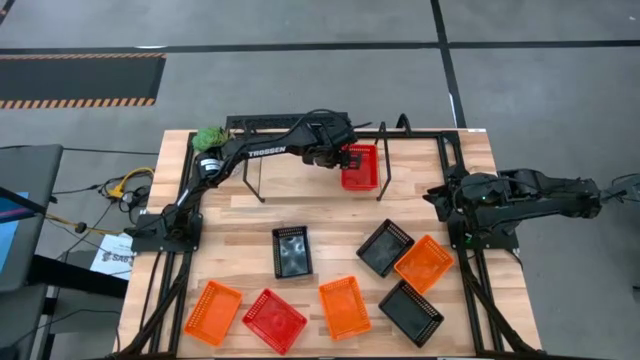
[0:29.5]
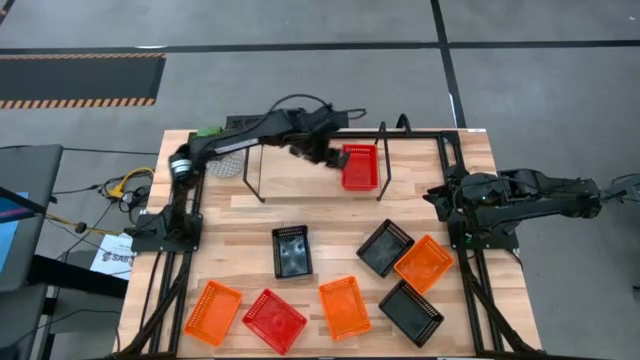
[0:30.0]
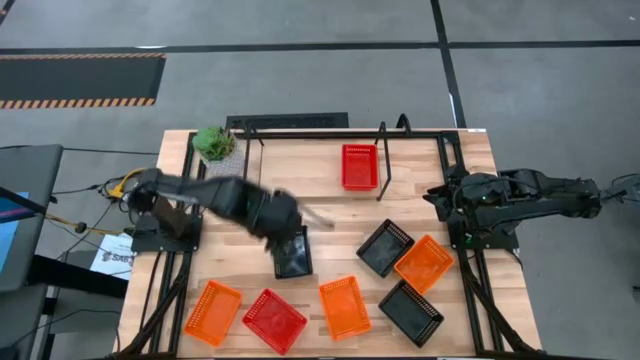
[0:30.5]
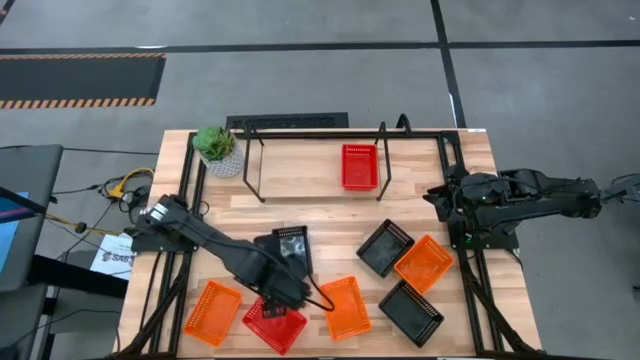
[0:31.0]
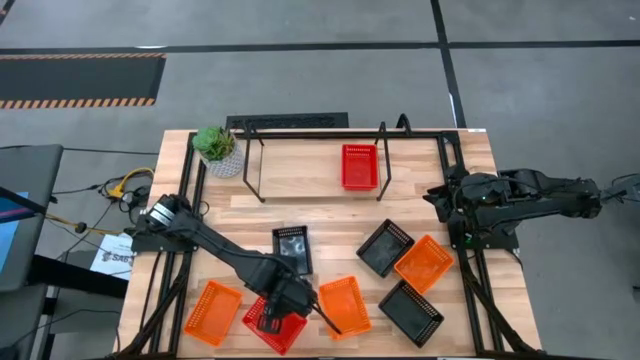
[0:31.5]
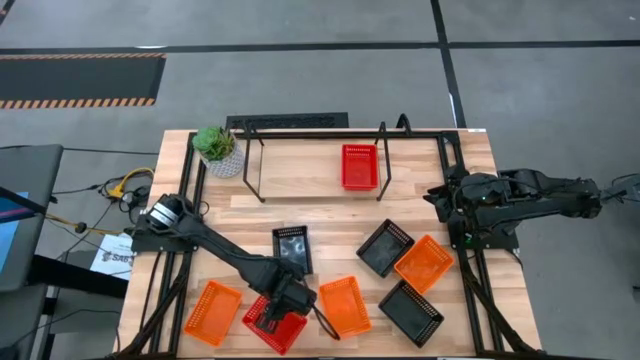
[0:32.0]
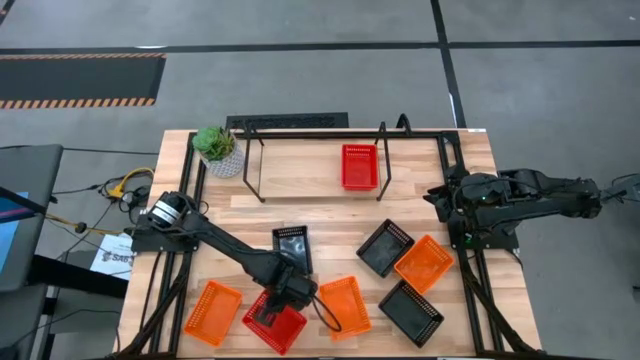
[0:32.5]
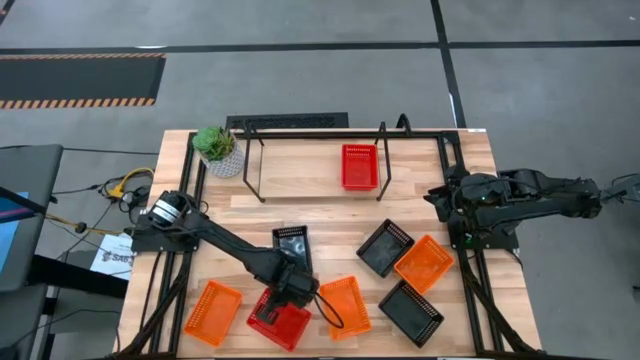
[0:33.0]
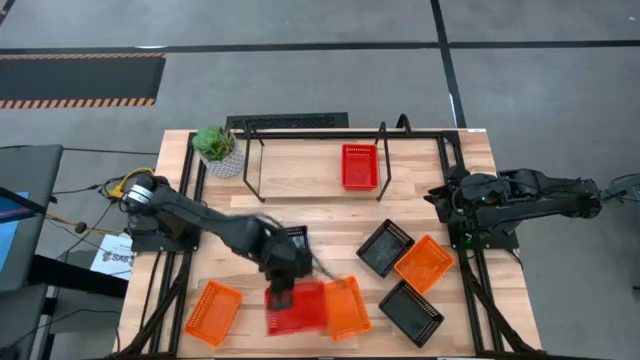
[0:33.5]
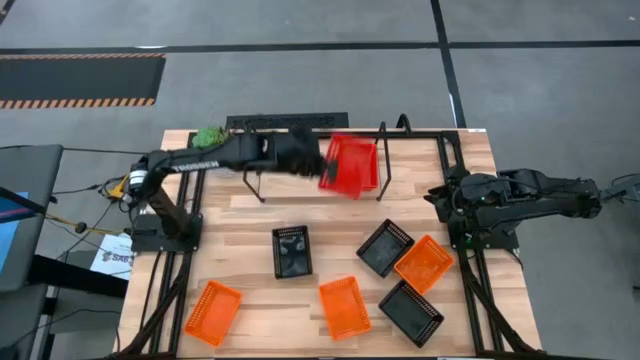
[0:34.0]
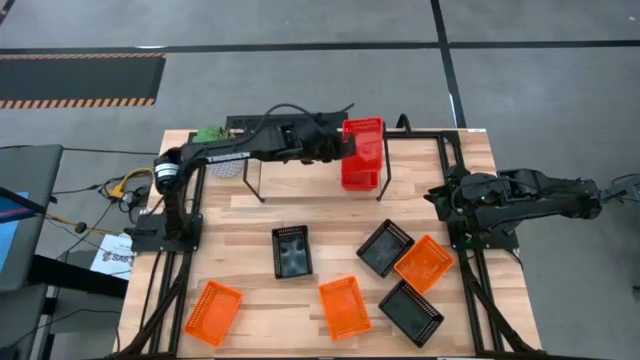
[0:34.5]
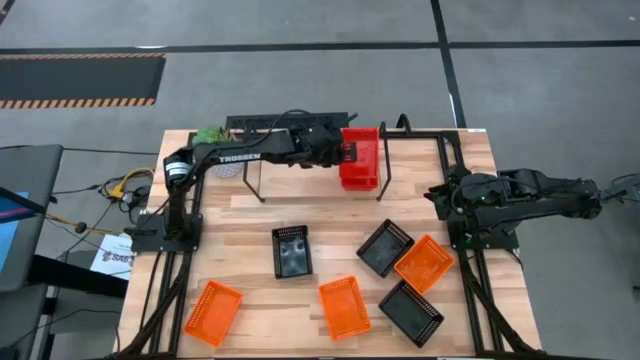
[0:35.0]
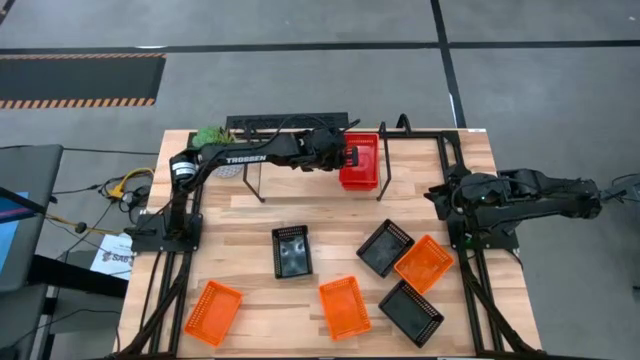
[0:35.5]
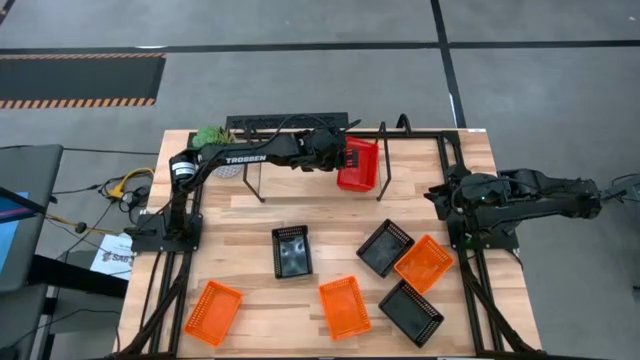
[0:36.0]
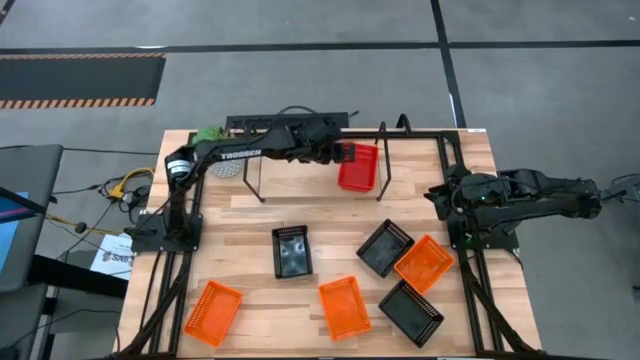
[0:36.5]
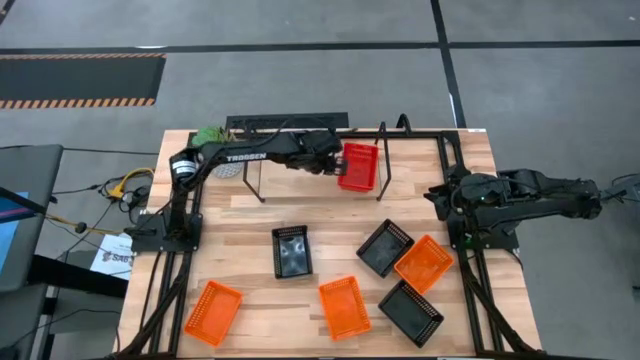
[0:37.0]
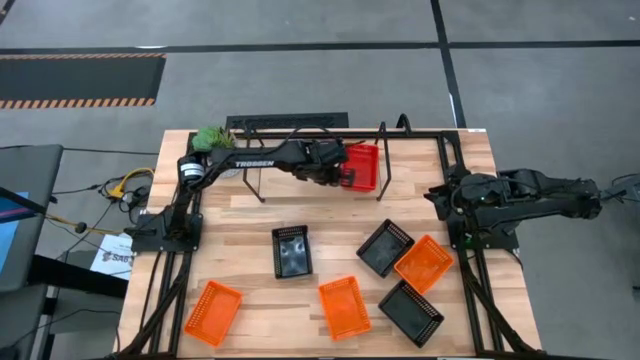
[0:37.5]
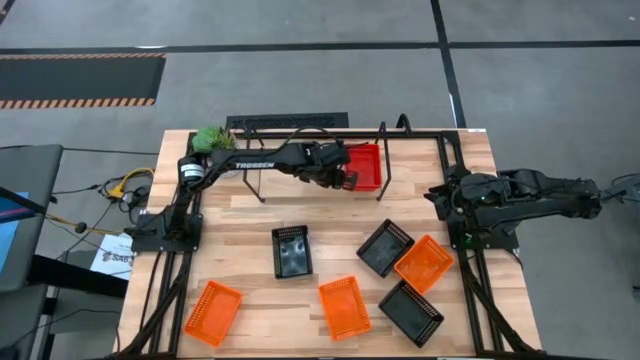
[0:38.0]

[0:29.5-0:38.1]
Task: Stack baskets on shelf by color
Stack the red bin on top of the red bins on the shelf

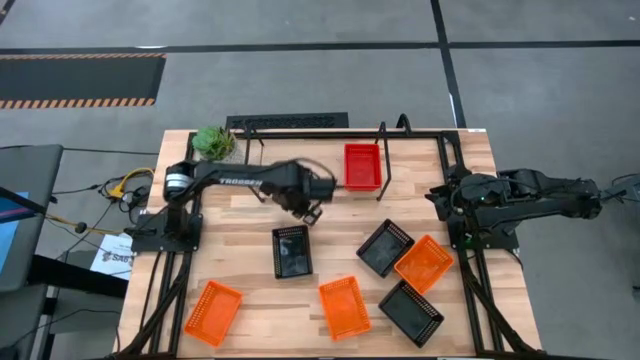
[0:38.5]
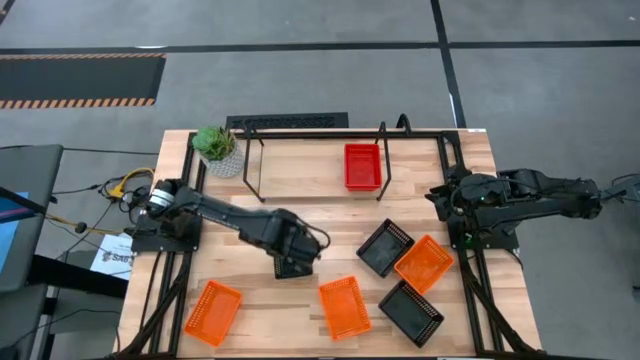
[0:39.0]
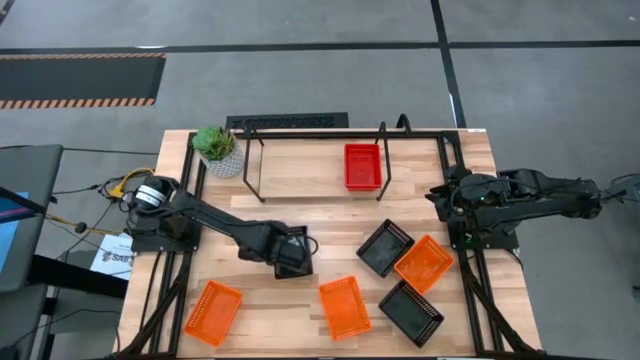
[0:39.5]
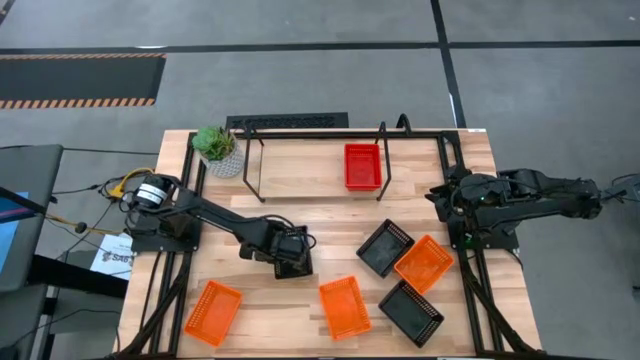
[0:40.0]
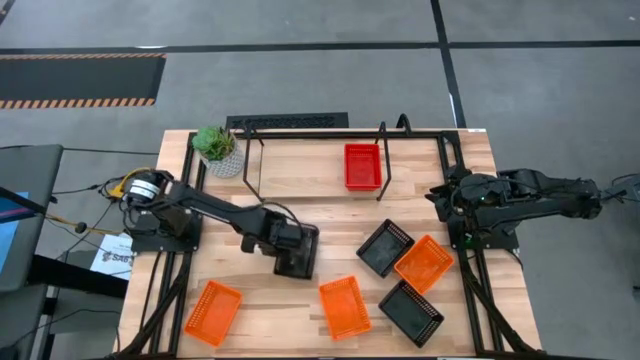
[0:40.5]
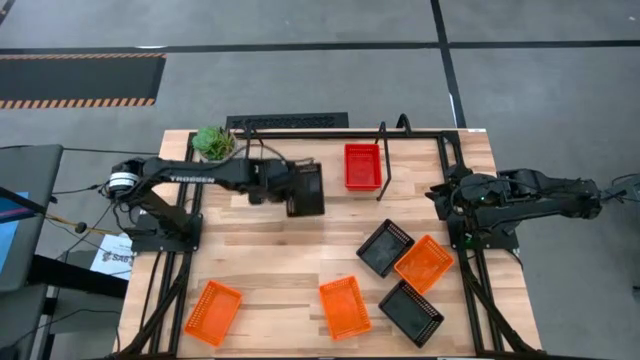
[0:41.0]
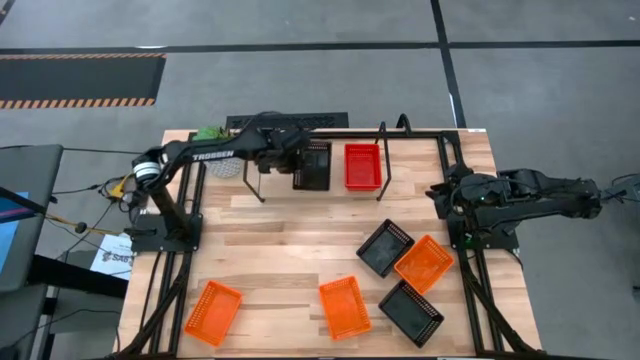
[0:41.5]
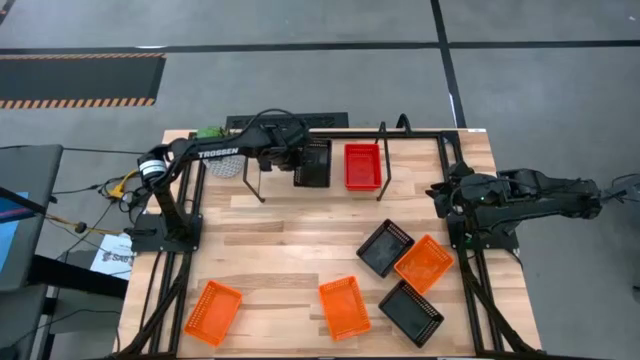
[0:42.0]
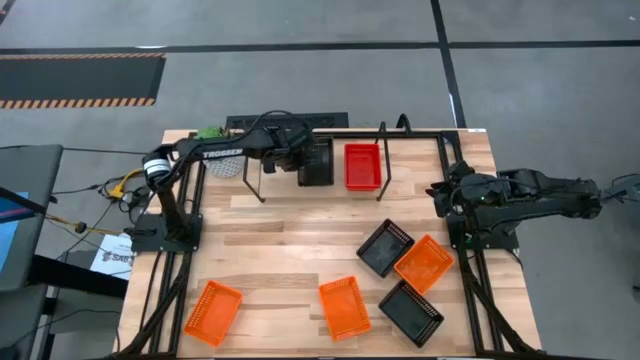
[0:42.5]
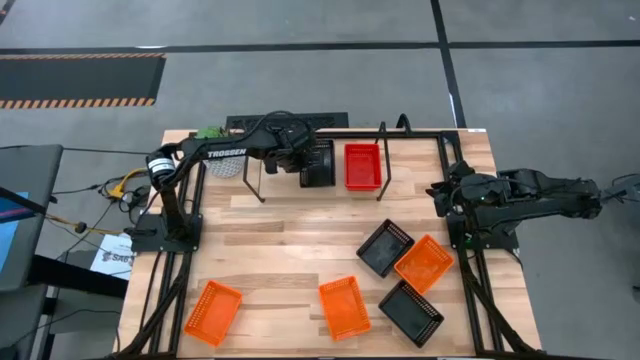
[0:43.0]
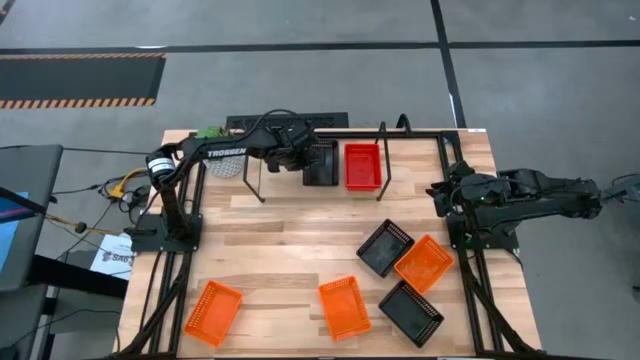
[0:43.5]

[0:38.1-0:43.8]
Put the top left black bin on the shelf

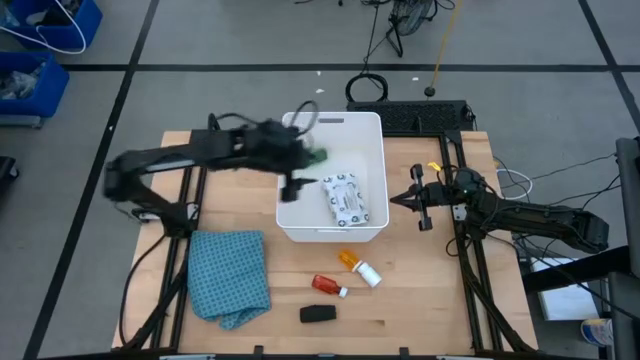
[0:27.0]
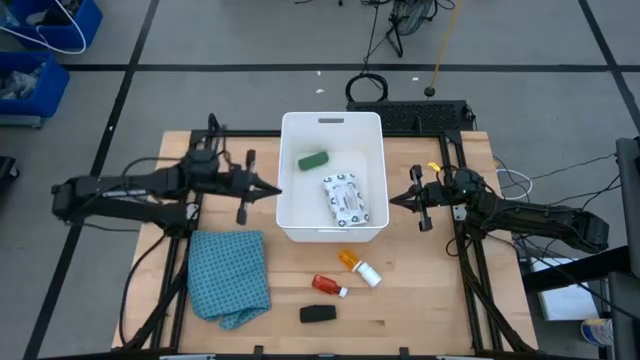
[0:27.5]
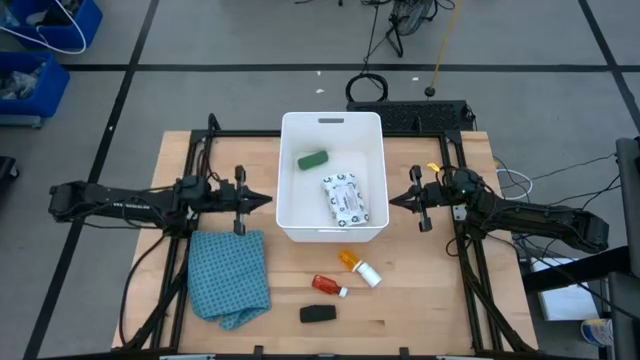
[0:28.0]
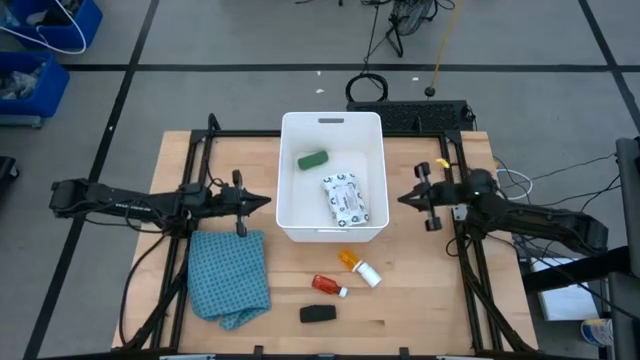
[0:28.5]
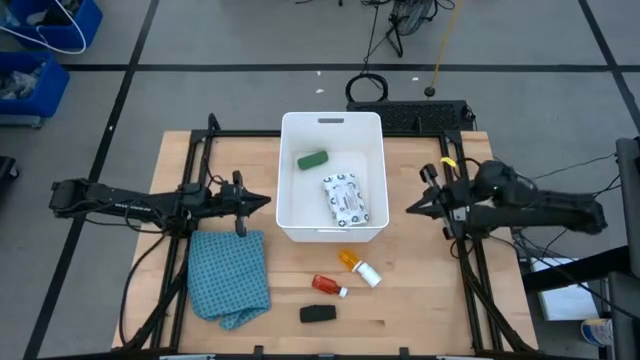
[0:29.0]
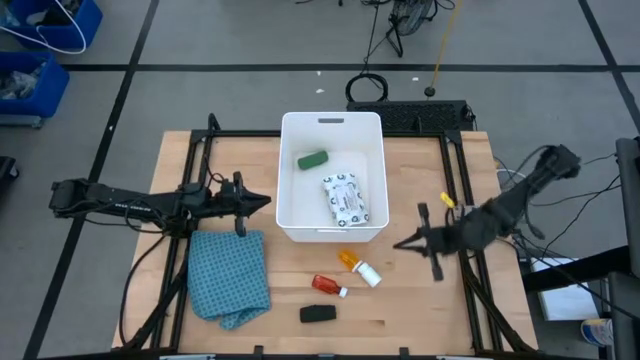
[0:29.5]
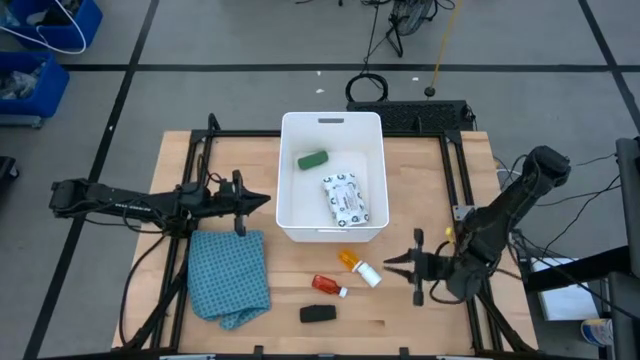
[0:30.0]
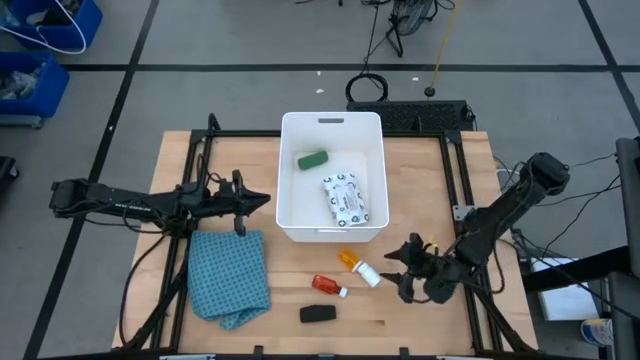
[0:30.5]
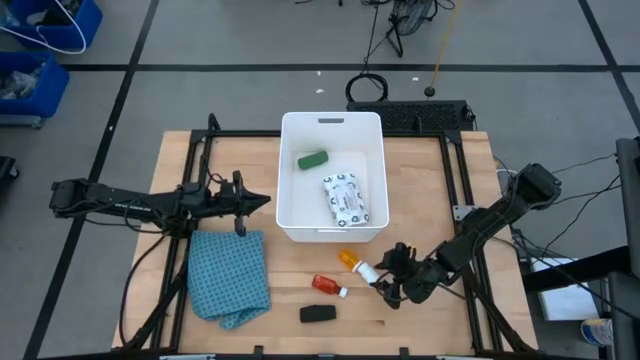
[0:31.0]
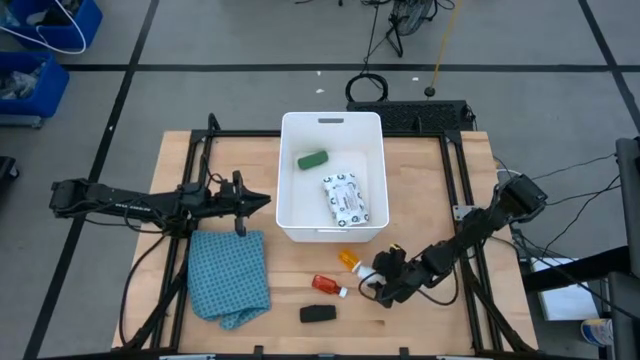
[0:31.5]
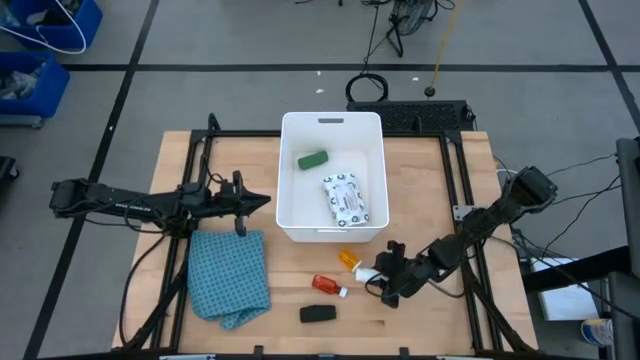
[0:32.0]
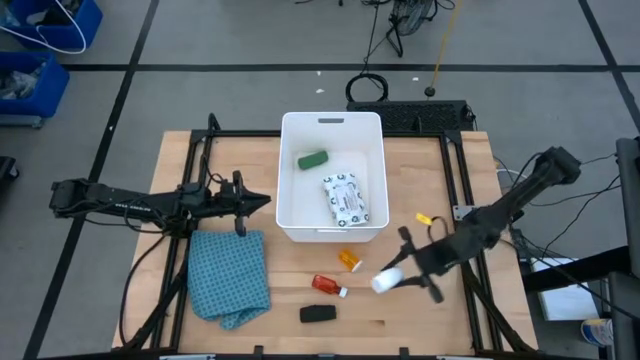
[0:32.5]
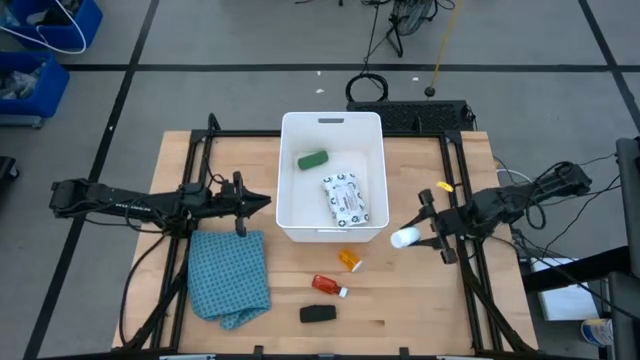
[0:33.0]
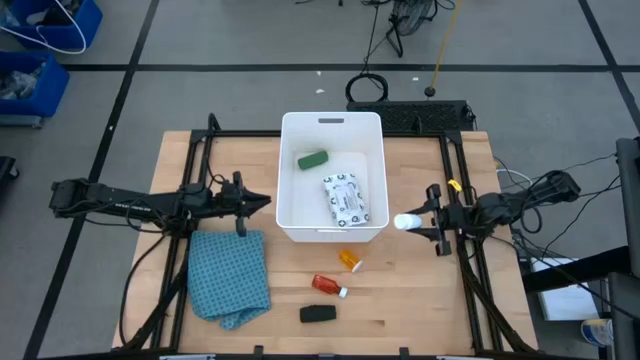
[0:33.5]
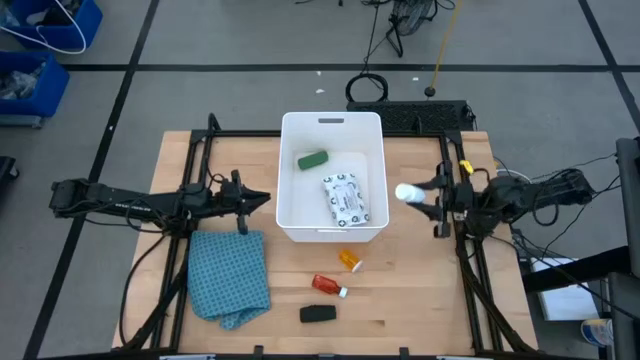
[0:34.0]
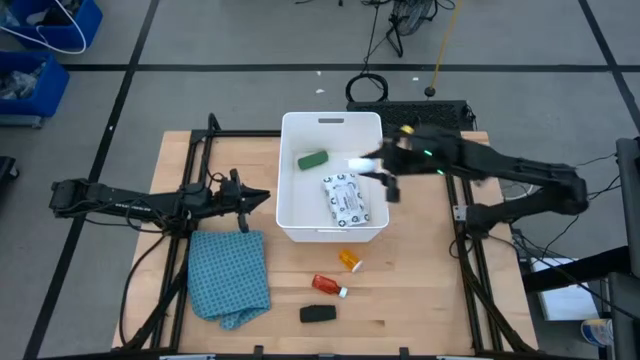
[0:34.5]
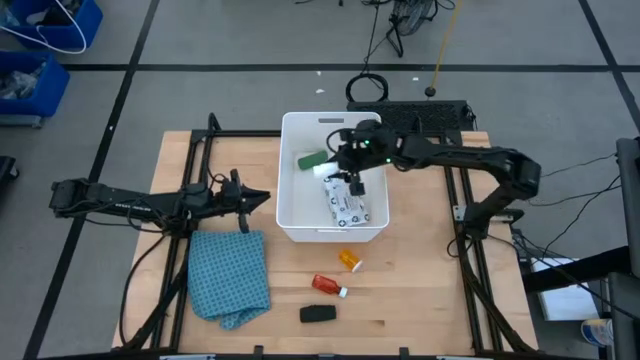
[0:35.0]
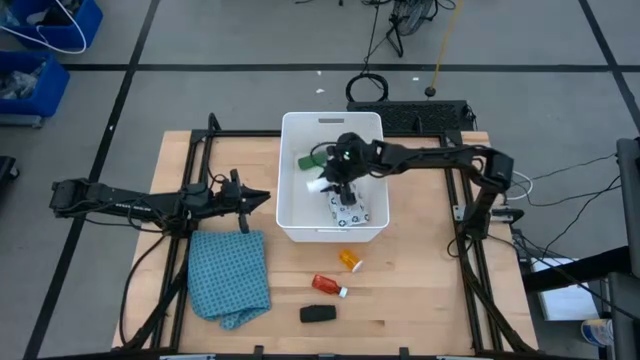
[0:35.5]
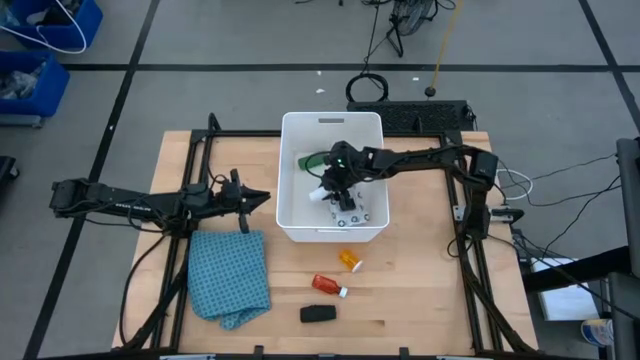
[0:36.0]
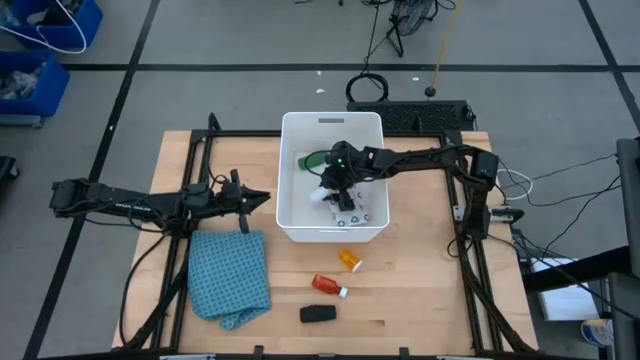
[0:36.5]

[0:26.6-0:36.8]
Task: Pick & place medical supplies in basket/bin
Put the white pill bottle into the white bin
